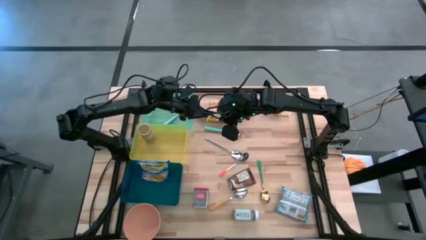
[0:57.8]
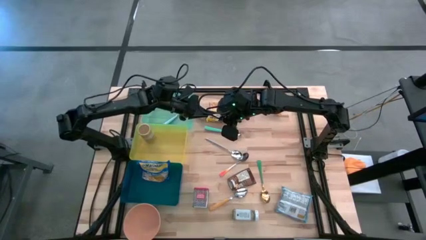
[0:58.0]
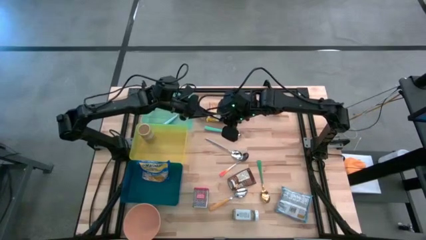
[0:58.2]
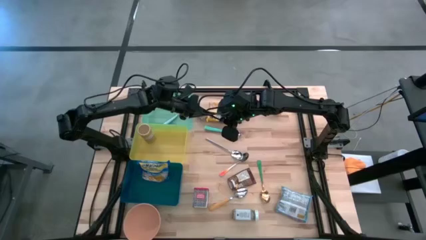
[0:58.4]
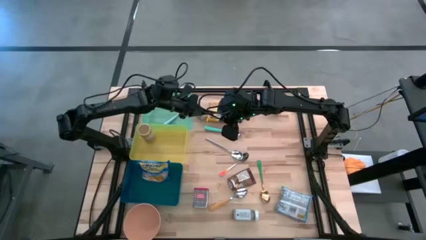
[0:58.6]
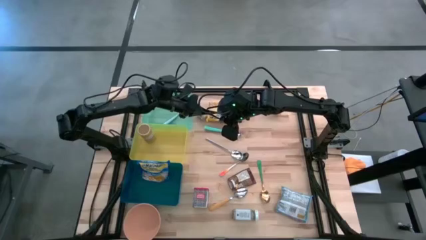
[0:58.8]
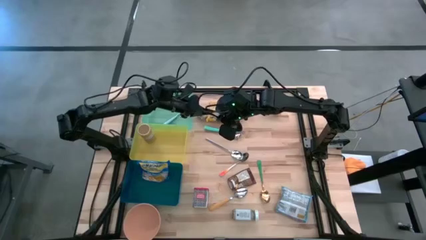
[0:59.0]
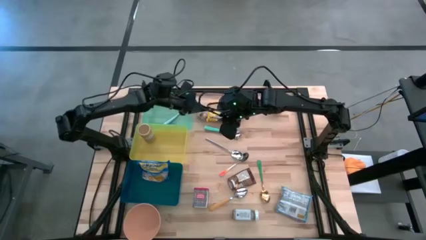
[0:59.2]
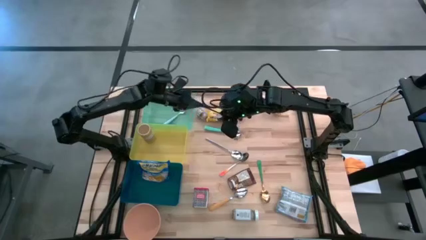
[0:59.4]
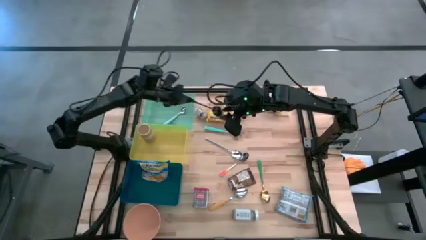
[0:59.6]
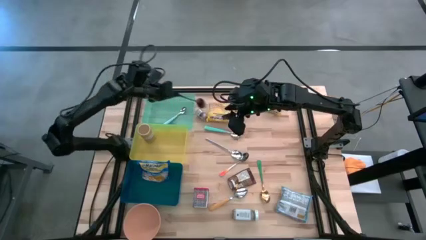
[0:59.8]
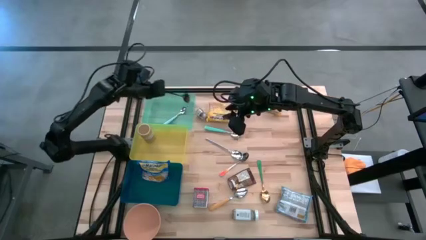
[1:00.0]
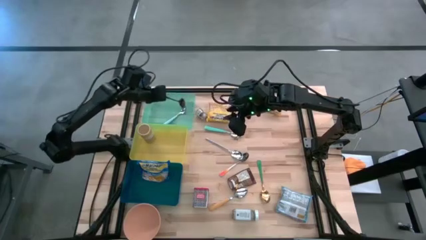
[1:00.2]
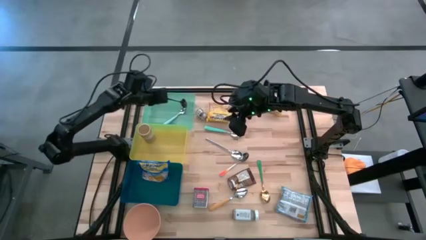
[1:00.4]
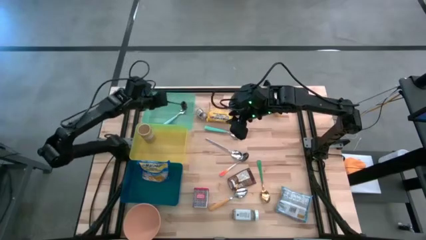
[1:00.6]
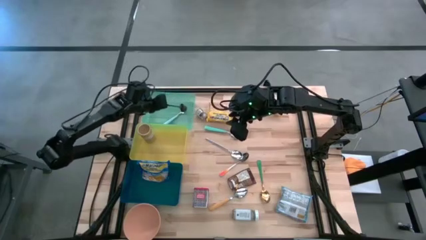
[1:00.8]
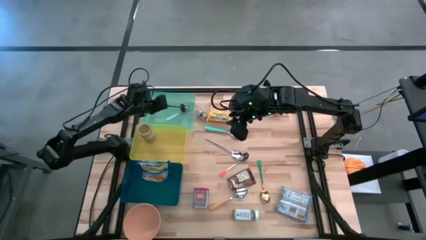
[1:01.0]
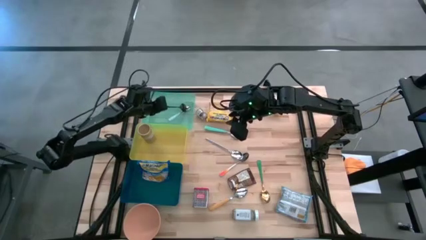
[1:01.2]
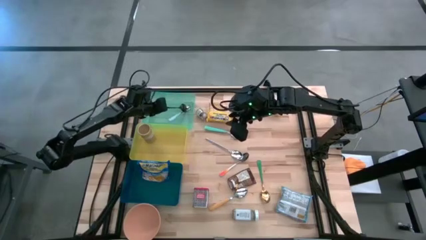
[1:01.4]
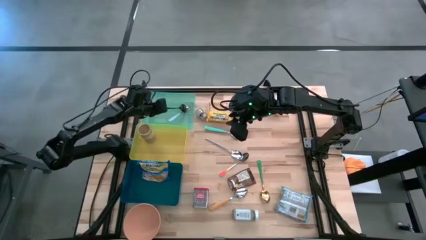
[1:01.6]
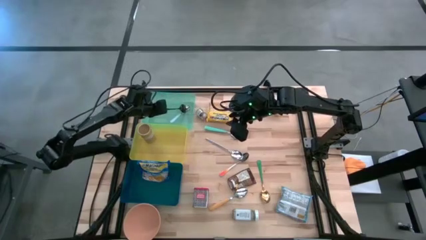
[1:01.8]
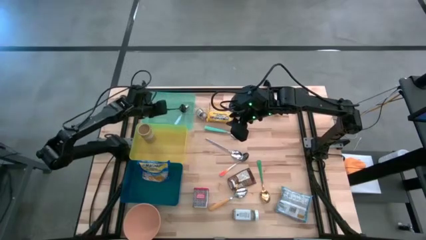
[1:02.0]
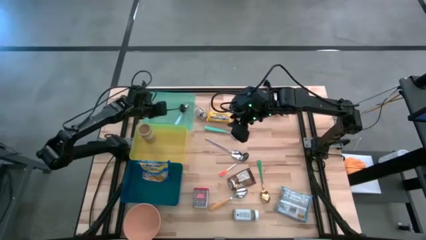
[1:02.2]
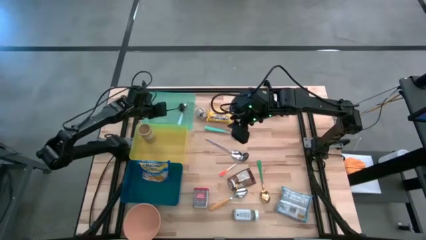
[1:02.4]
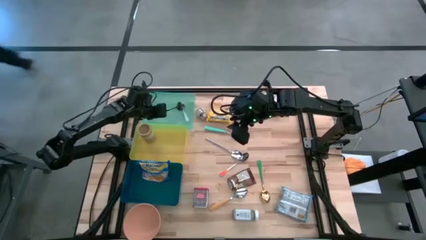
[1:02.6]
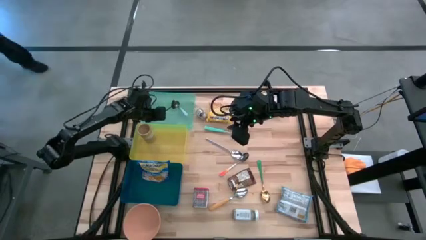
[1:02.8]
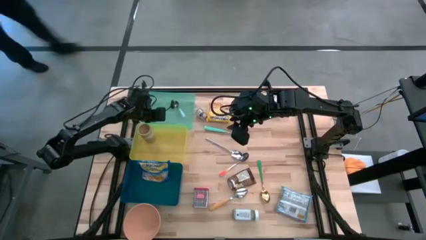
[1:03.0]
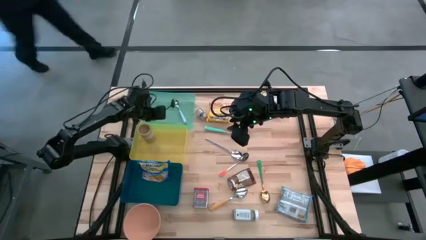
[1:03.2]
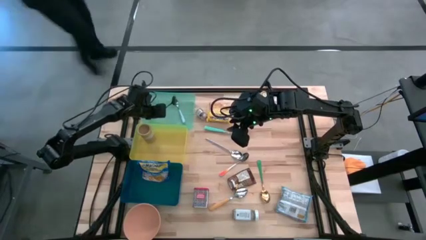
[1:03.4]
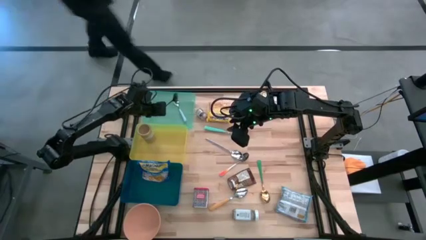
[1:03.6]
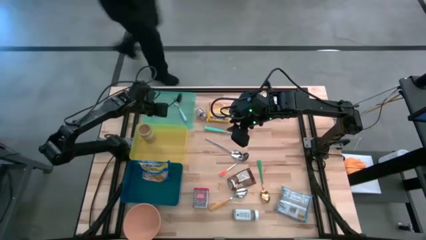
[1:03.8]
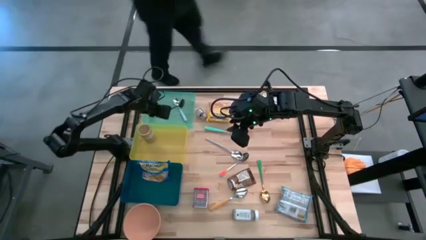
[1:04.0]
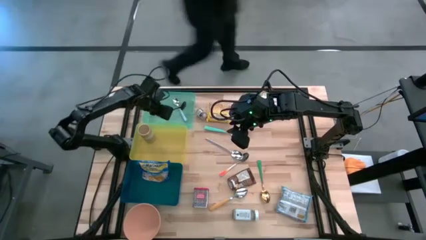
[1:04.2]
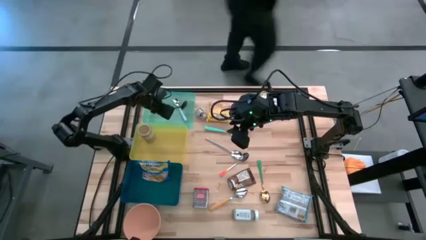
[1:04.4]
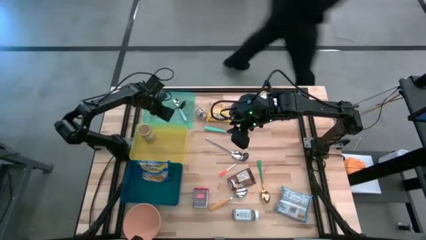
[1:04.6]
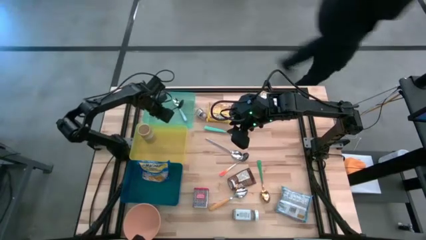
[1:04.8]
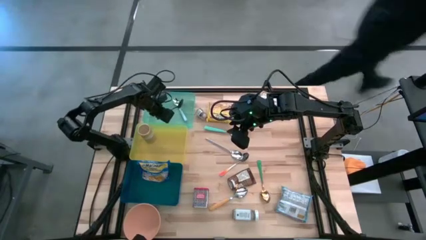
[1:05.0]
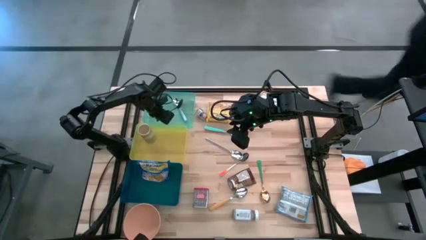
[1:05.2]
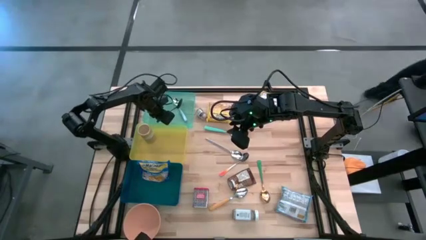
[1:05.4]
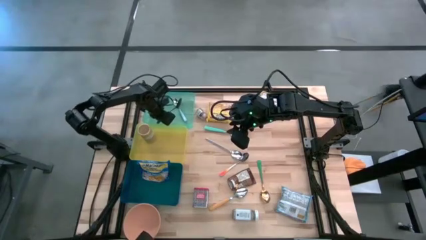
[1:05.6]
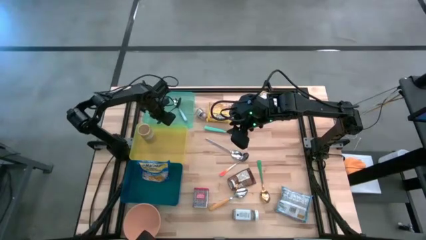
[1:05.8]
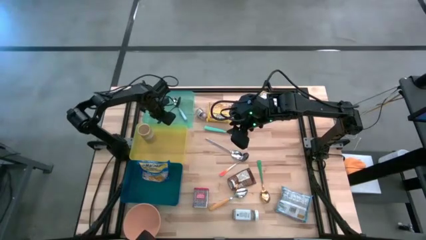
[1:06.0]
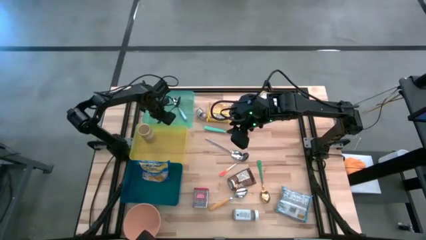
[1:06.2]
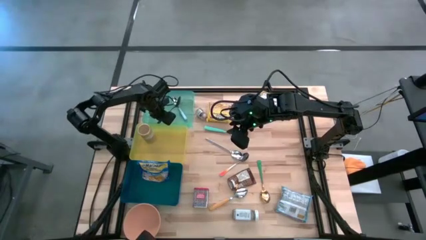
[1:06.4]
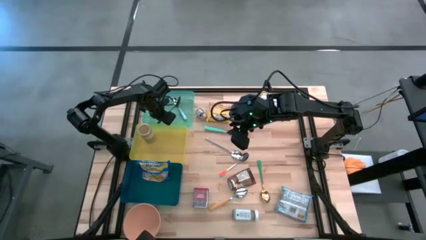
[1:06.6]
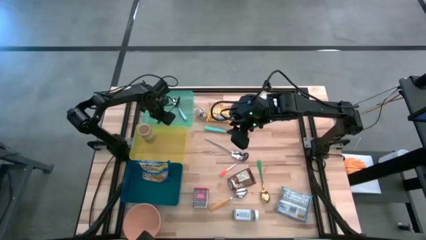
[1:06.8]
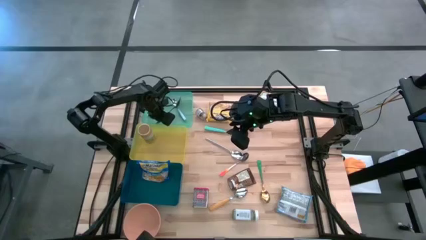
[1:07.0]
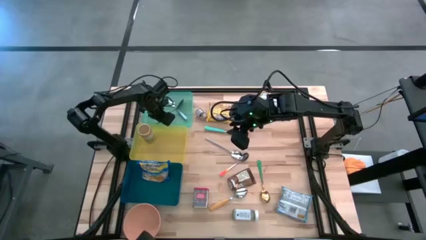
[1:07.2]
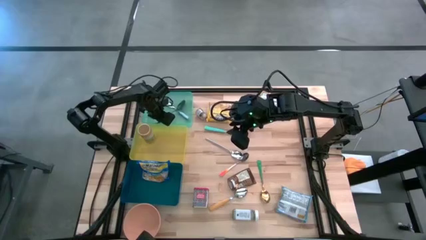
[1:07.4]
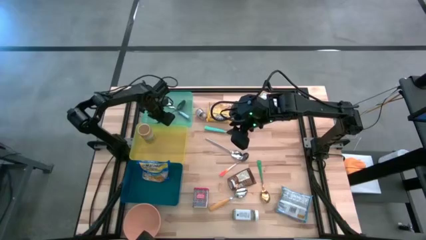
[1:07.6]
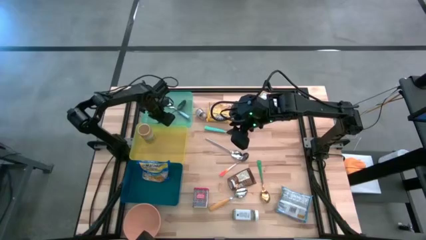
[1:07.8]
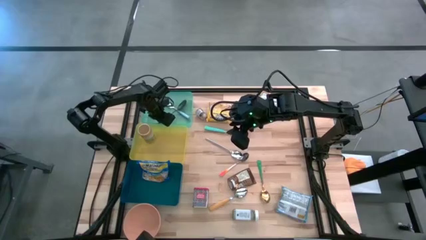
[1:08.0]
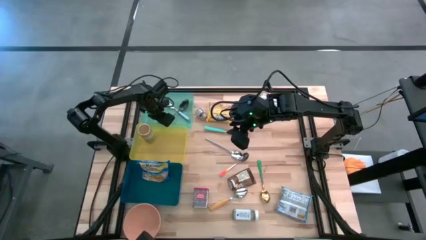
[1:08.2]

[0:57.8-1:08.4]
Put the black spoon into the green bin
